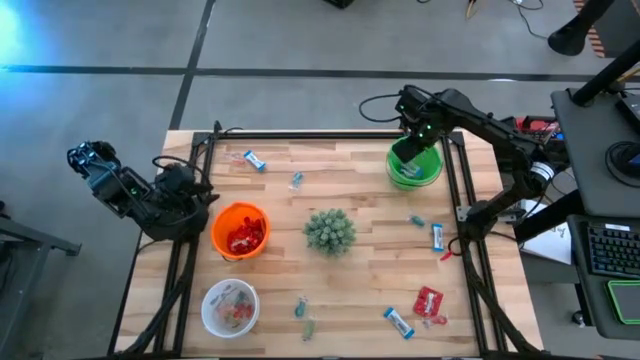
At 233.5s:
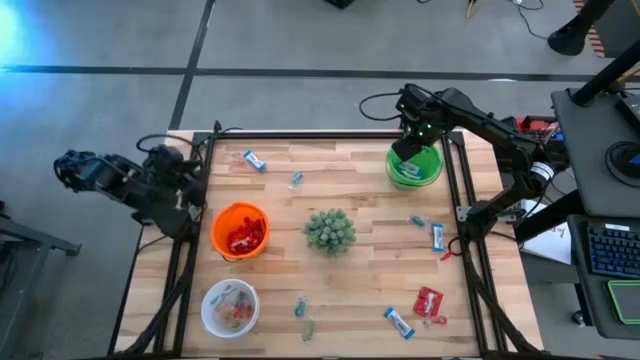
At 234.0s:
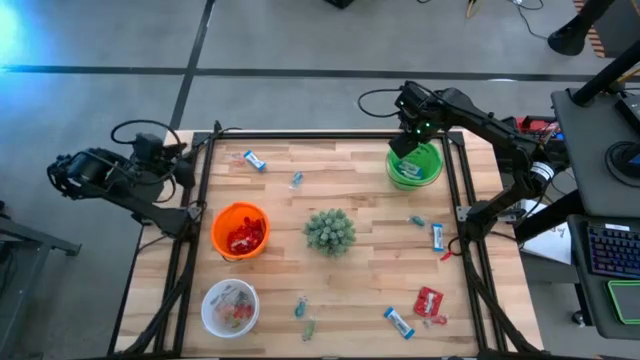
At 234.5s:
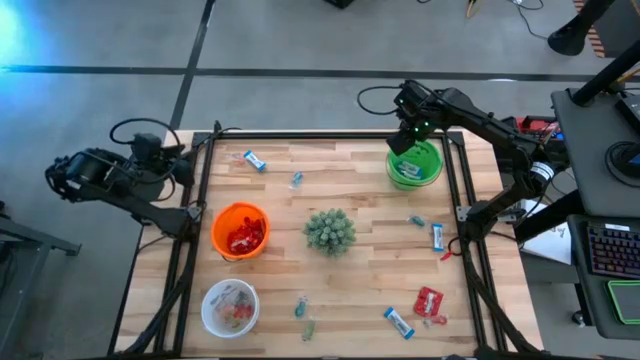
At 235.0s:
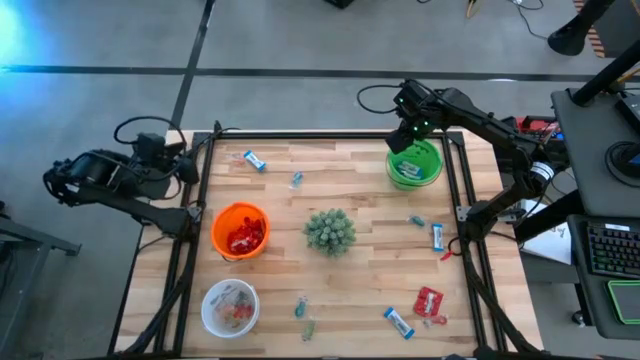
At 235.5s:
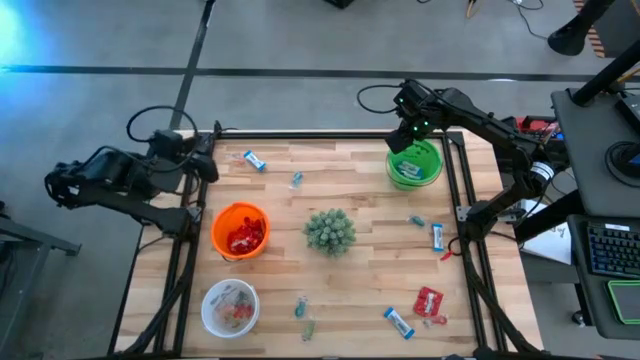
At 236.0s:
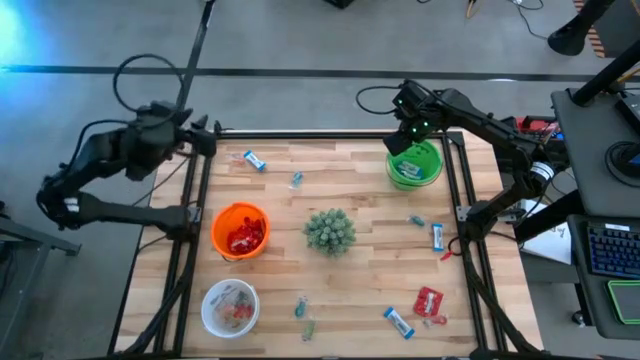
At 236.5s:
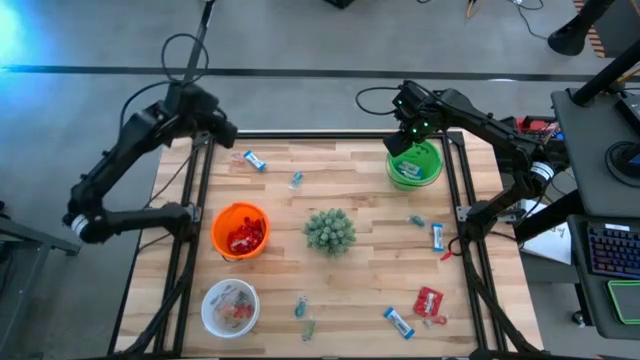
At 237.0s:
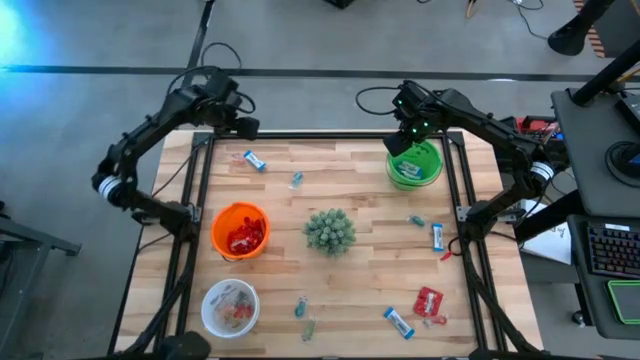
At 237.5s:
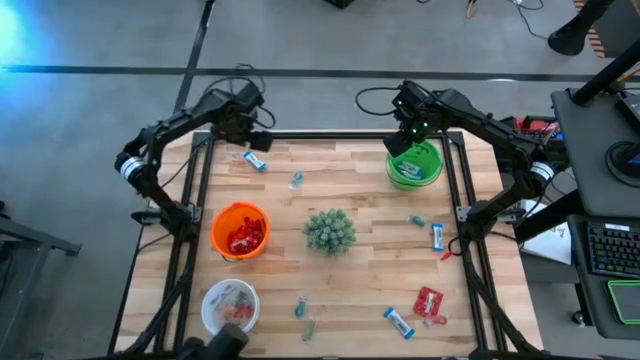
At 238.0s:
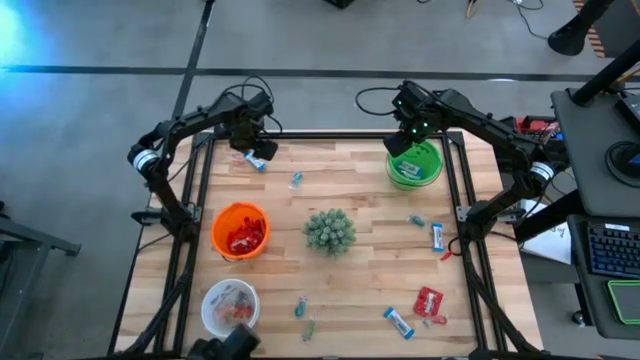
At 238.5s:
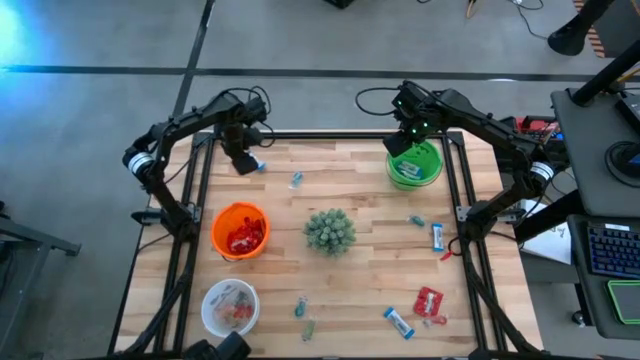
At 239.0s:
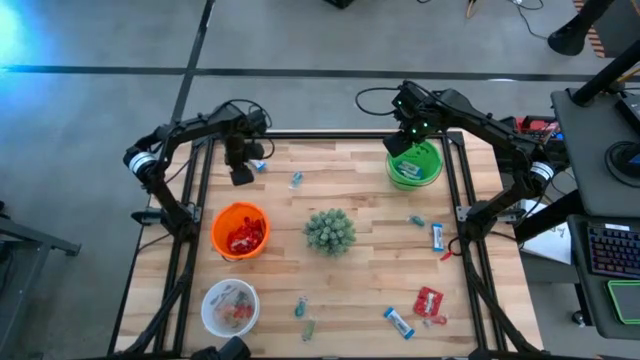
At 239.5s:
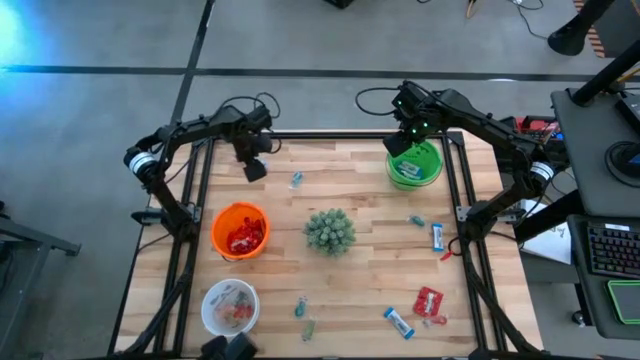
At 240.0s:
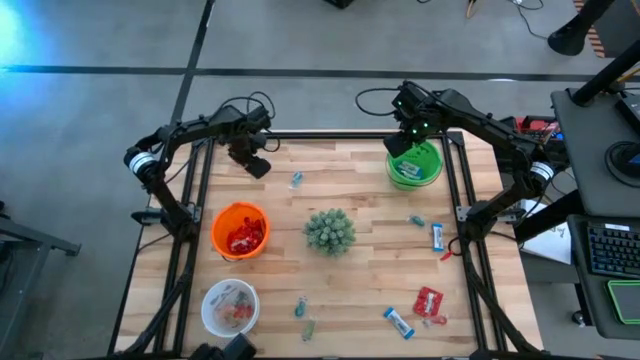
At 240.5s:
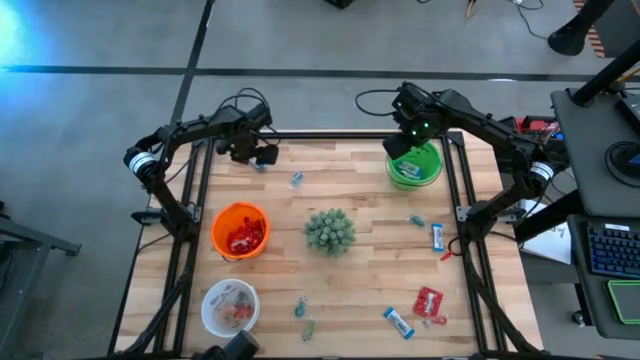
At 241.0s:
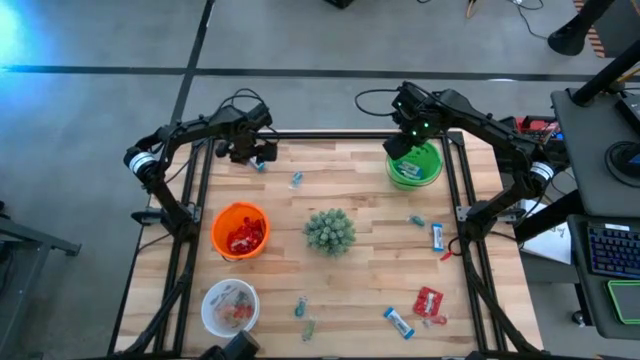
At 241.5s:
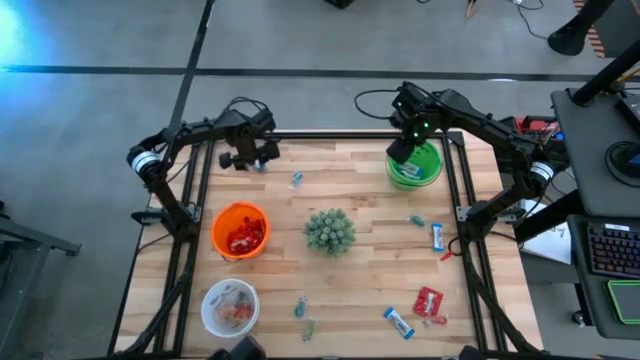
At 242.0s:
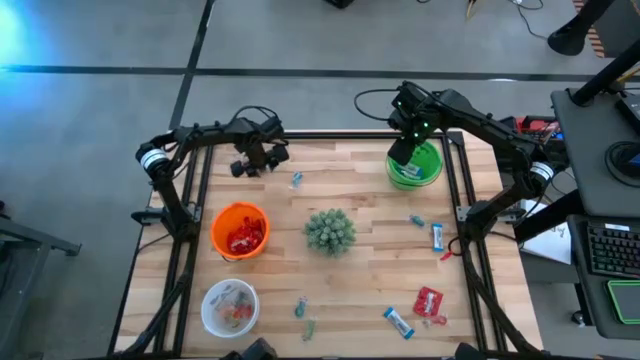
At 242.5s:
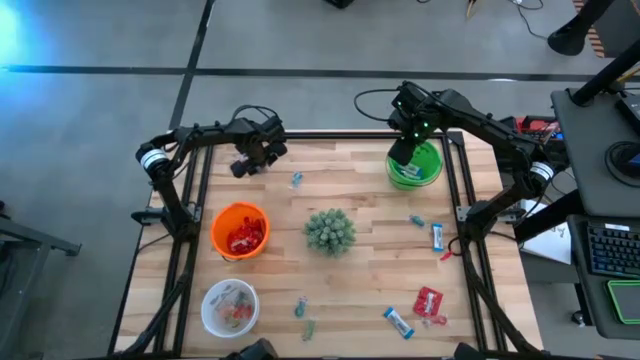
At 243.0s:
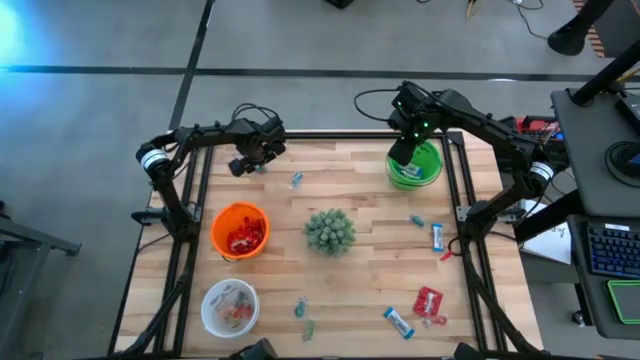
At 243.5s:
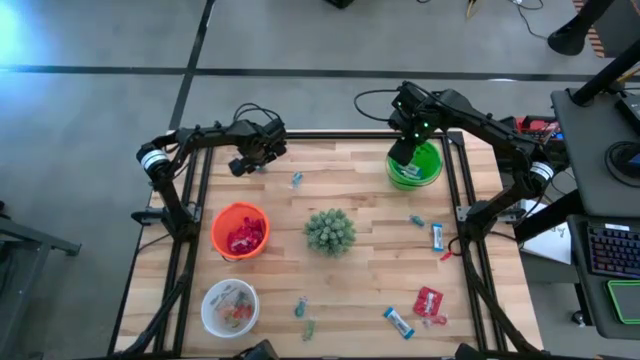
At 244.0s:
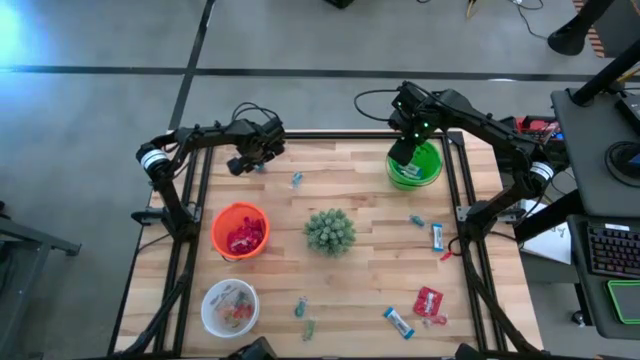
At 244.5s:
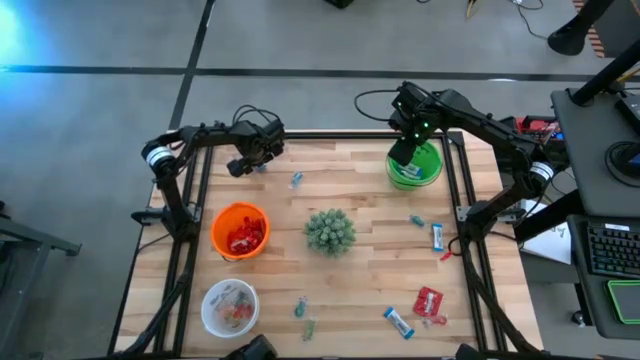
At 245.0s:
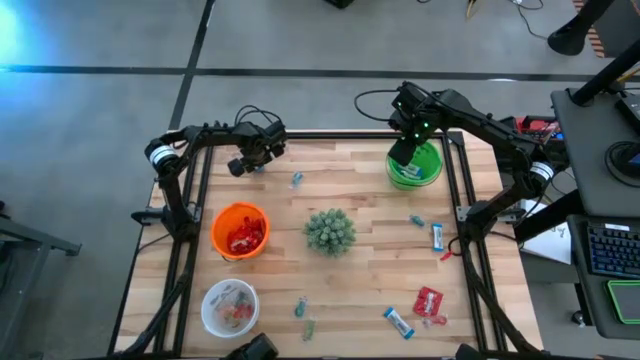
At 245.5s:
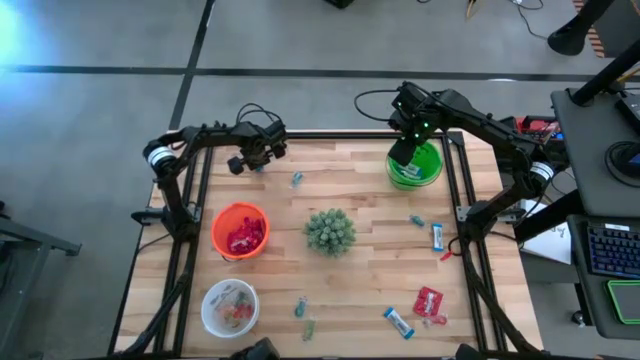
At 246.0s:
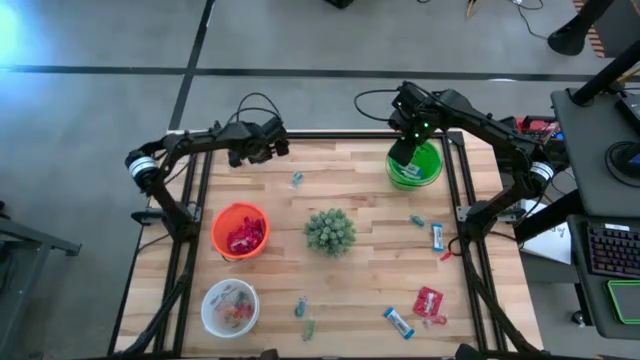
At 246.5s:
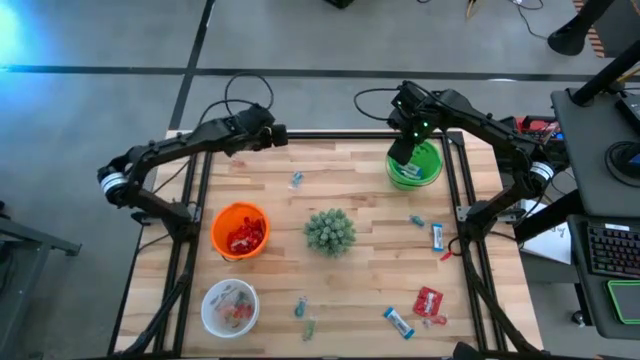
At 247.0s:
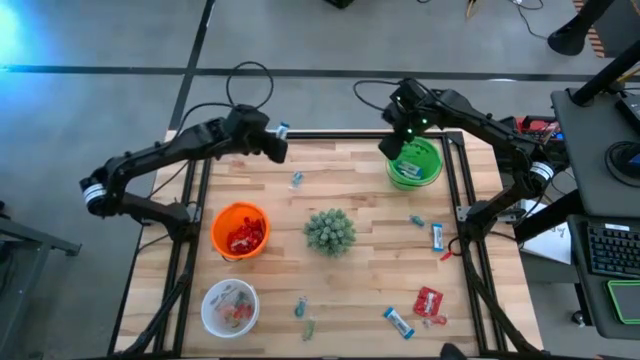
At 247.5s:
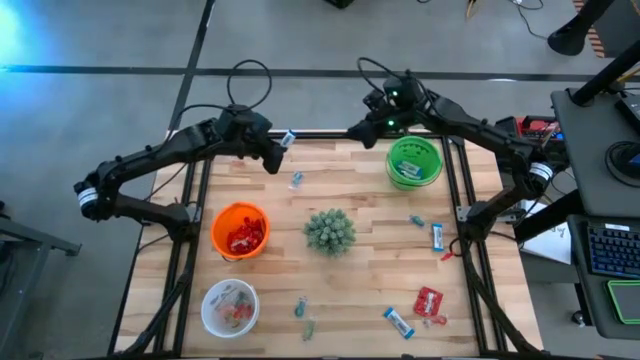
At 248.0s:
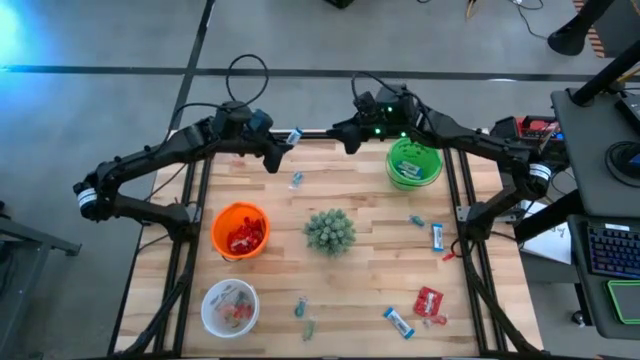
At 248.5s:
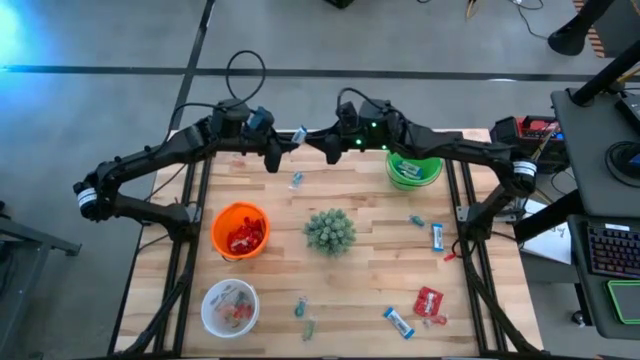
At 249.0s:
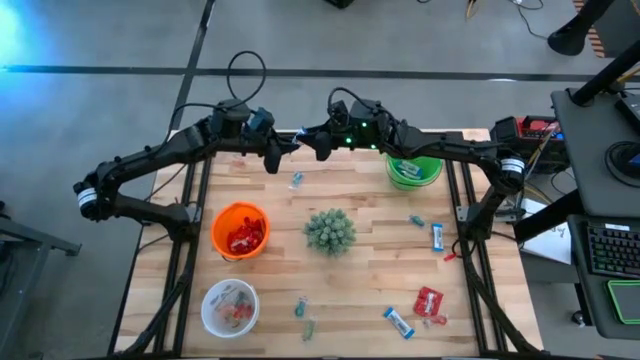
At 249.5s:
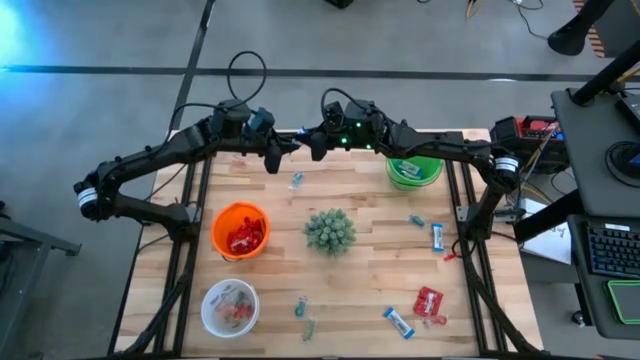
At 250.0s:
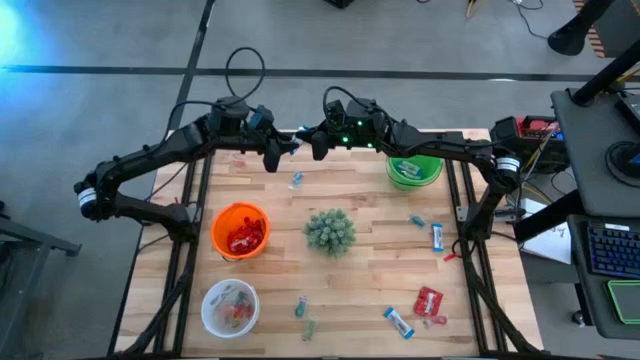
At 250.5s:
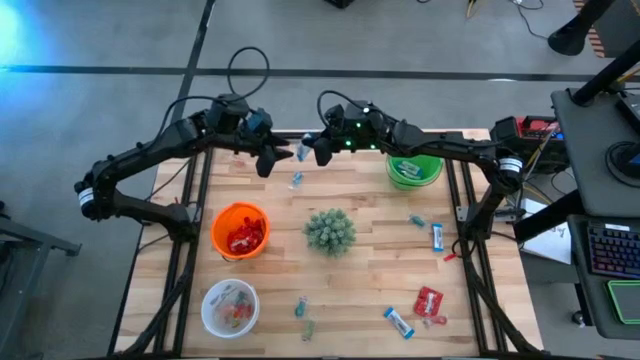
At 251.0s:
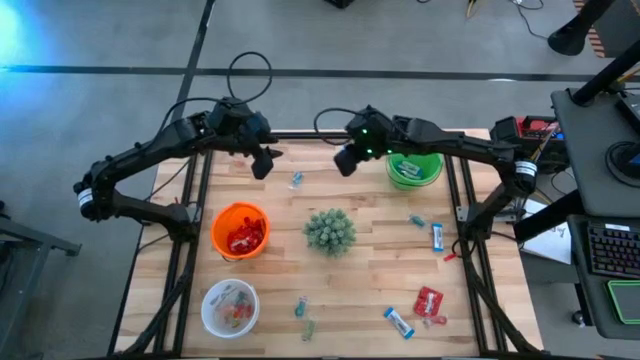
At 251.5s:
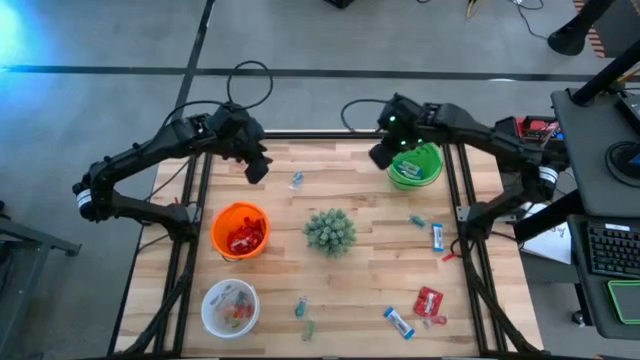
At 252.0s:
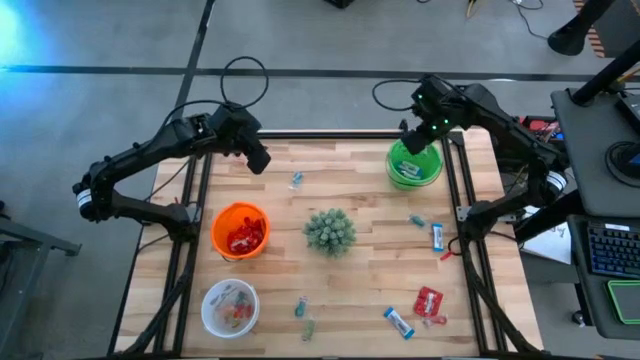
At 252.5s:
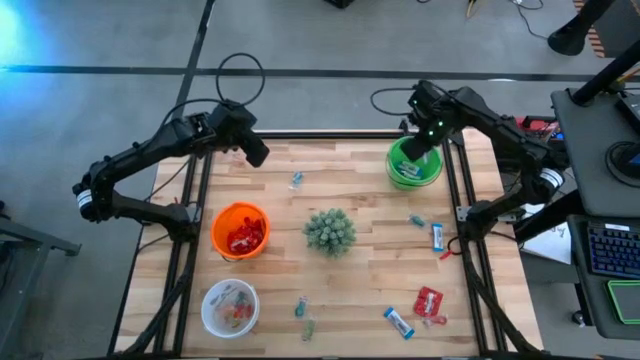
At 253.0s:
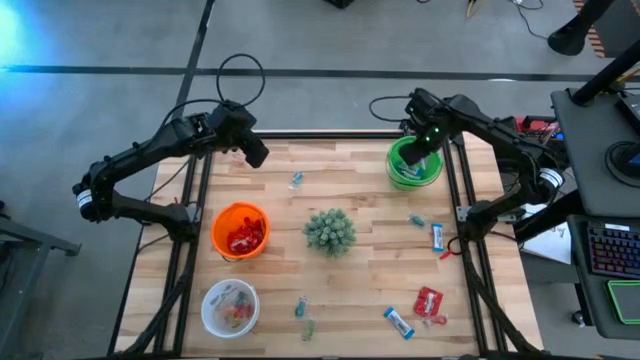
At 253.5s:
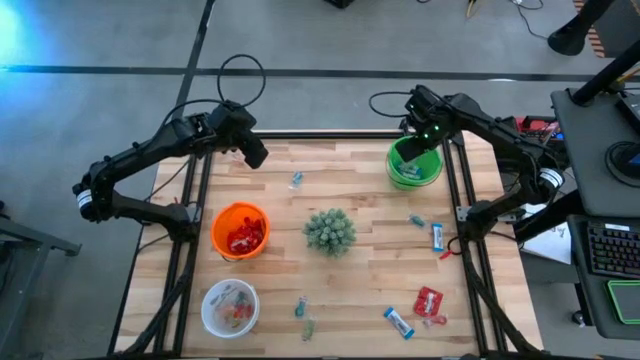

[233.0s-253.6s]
Task: Sort candy
Put the white chocolate into the green bucket
